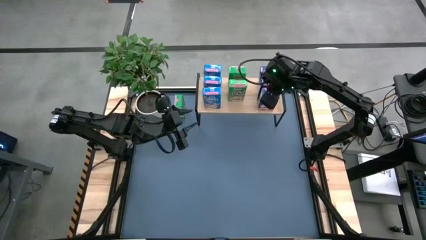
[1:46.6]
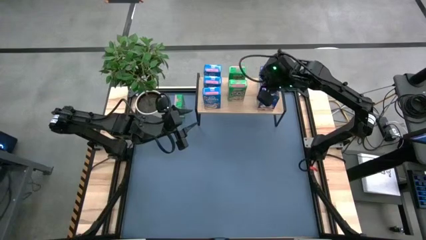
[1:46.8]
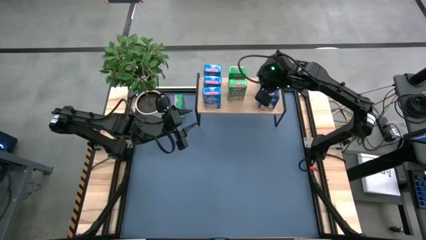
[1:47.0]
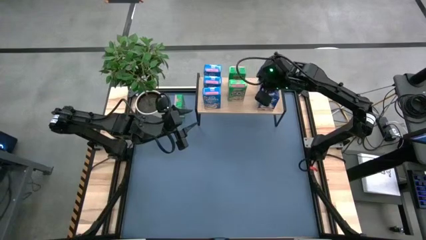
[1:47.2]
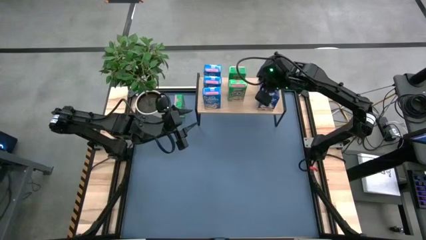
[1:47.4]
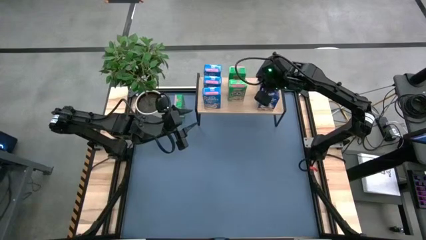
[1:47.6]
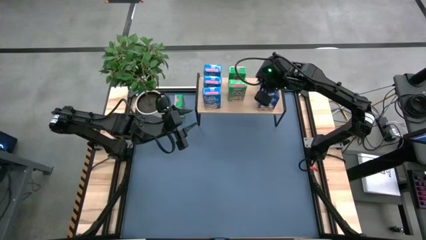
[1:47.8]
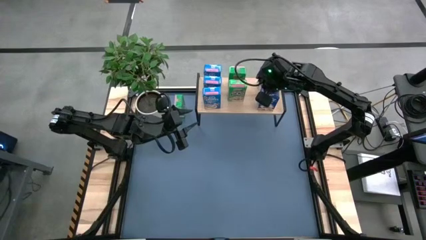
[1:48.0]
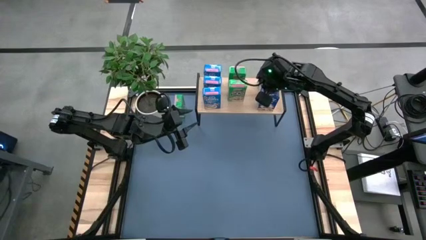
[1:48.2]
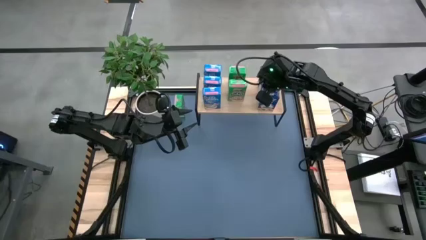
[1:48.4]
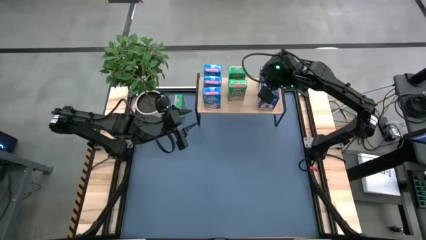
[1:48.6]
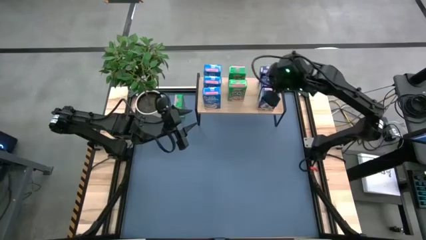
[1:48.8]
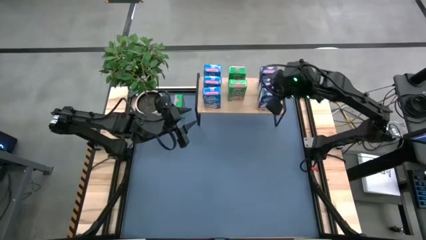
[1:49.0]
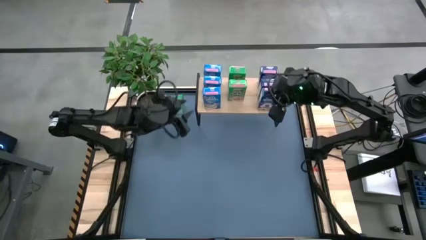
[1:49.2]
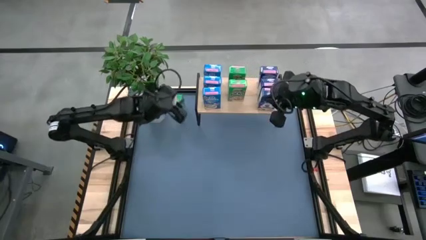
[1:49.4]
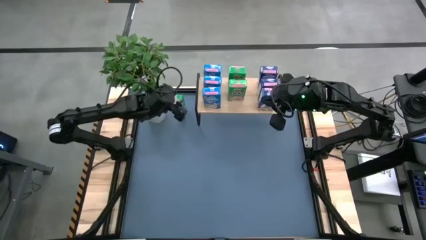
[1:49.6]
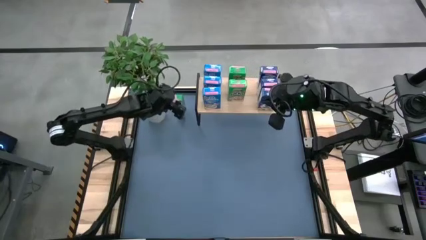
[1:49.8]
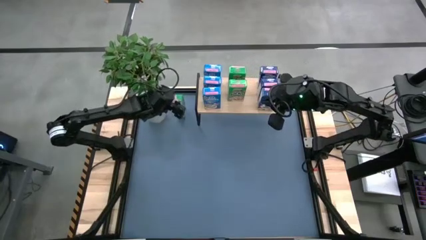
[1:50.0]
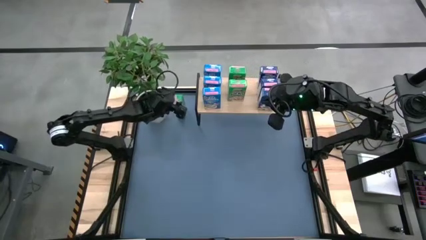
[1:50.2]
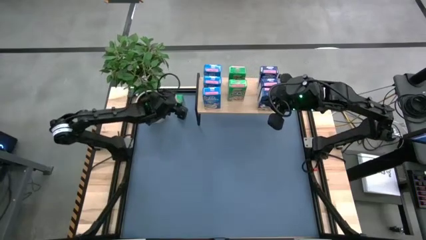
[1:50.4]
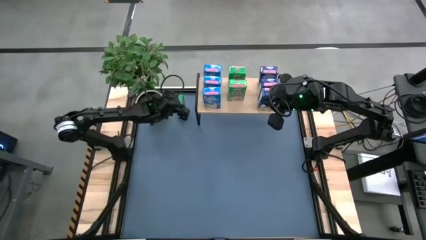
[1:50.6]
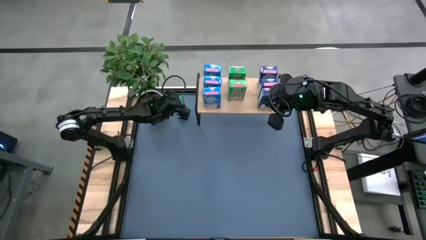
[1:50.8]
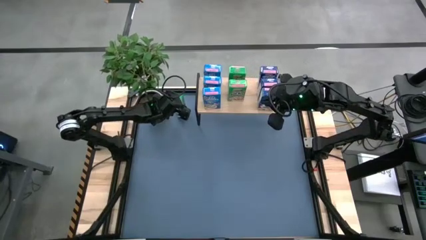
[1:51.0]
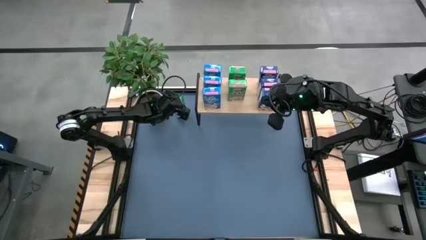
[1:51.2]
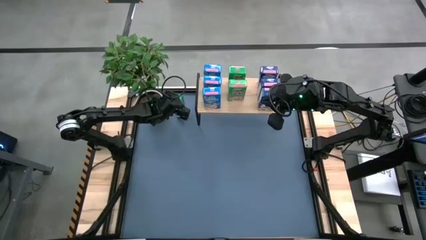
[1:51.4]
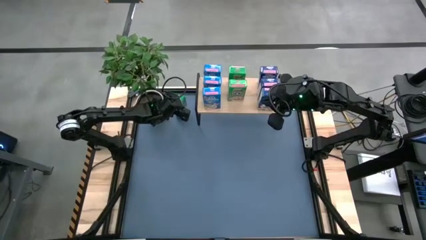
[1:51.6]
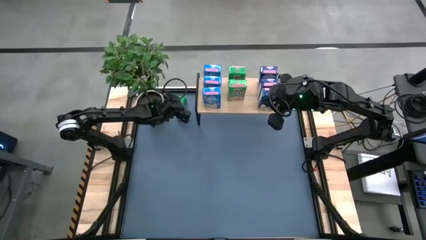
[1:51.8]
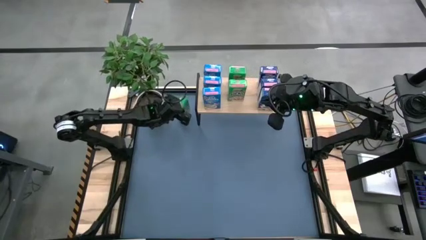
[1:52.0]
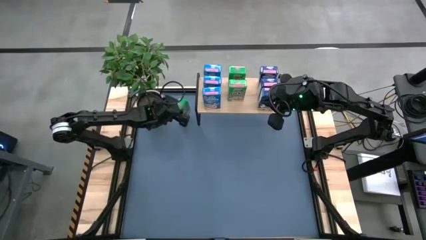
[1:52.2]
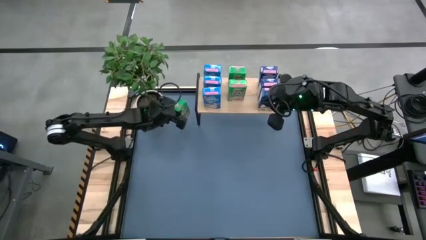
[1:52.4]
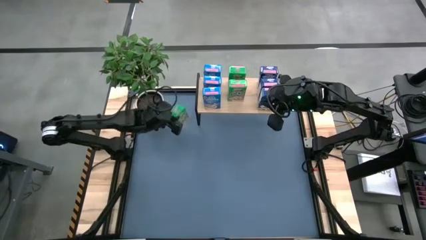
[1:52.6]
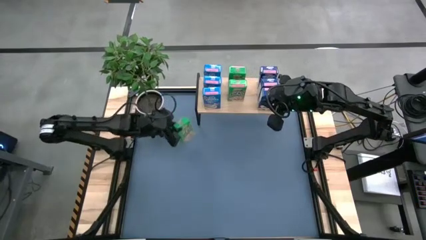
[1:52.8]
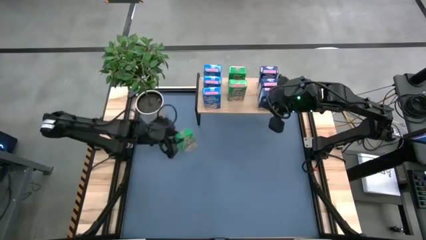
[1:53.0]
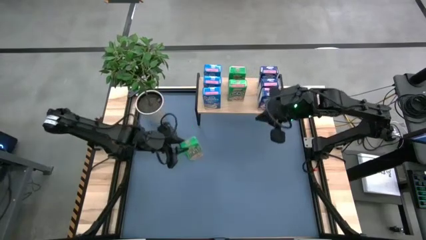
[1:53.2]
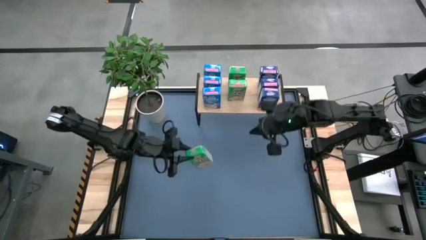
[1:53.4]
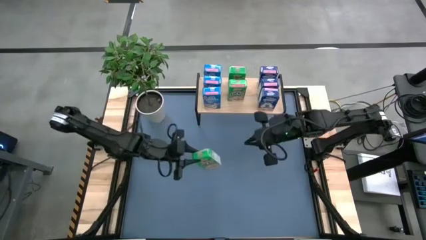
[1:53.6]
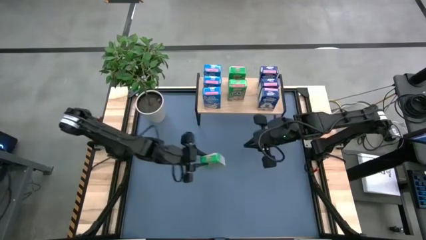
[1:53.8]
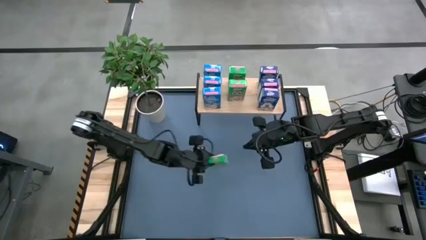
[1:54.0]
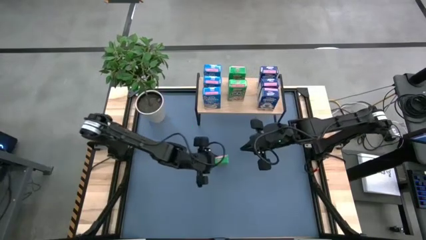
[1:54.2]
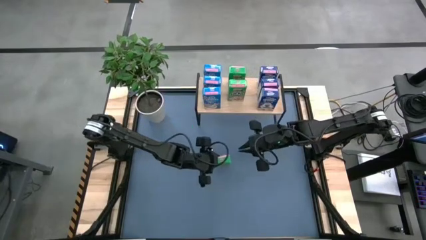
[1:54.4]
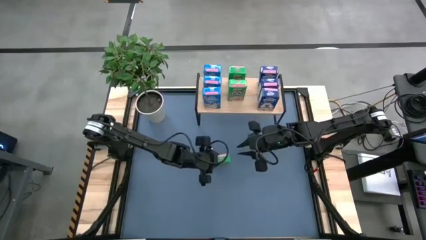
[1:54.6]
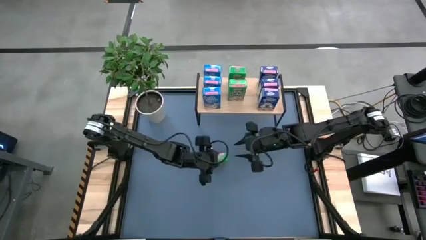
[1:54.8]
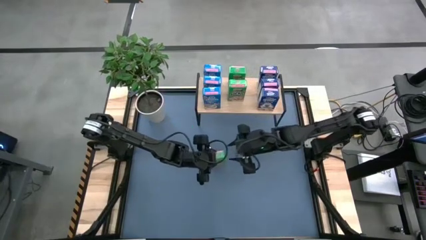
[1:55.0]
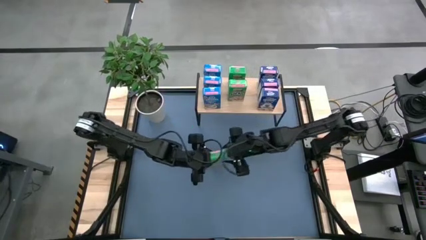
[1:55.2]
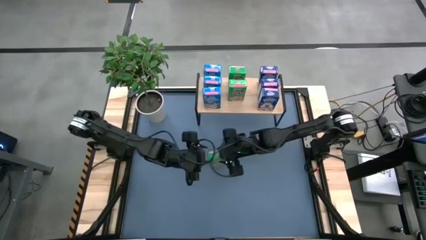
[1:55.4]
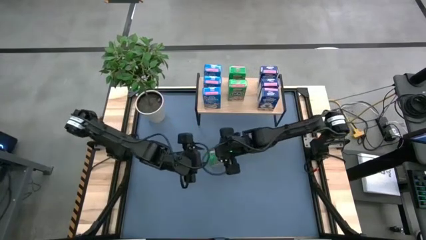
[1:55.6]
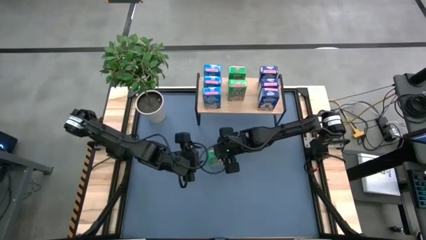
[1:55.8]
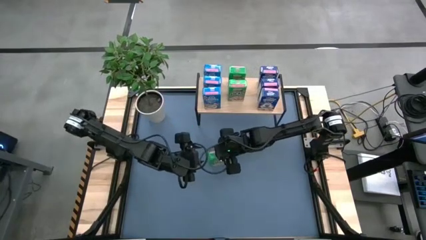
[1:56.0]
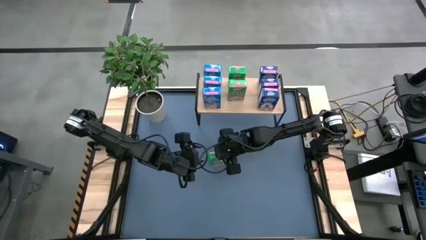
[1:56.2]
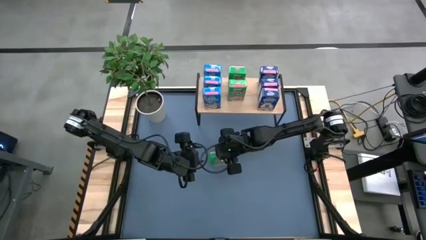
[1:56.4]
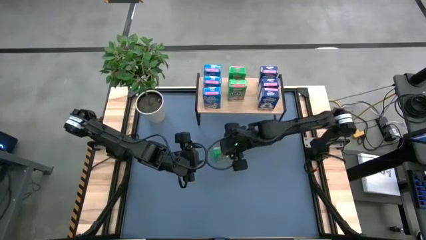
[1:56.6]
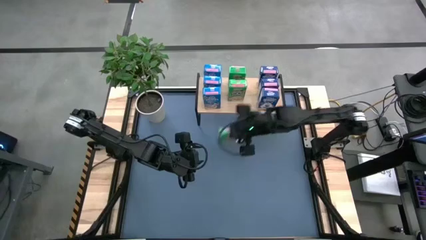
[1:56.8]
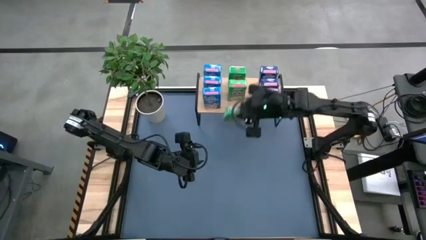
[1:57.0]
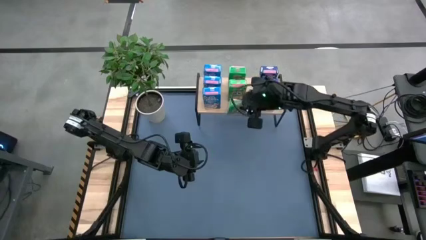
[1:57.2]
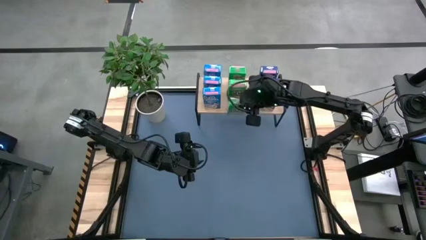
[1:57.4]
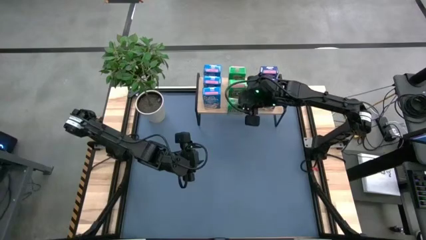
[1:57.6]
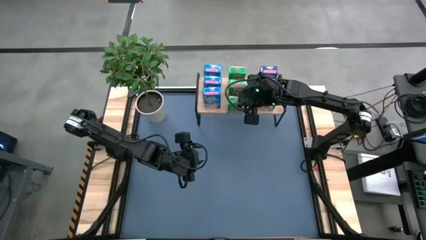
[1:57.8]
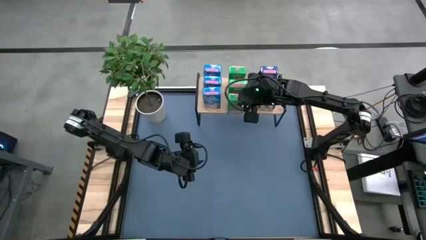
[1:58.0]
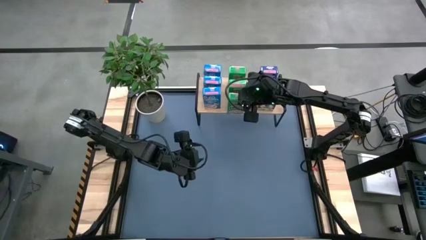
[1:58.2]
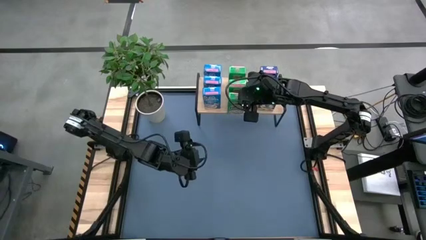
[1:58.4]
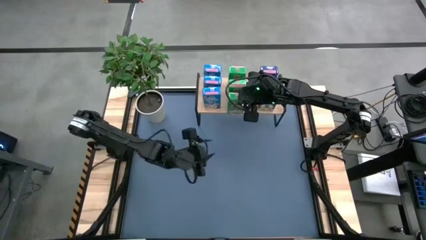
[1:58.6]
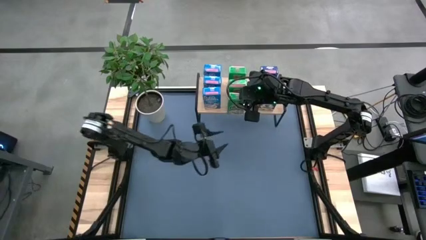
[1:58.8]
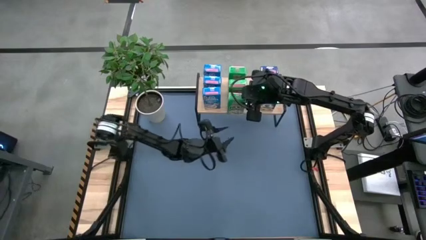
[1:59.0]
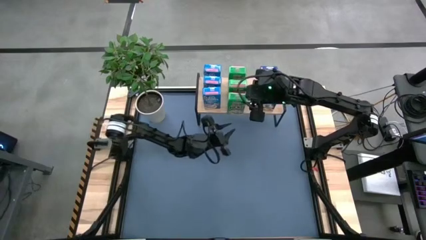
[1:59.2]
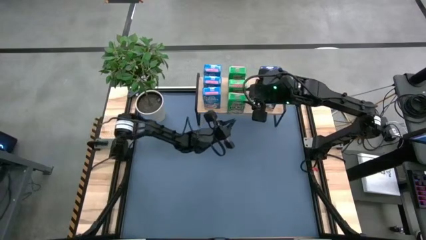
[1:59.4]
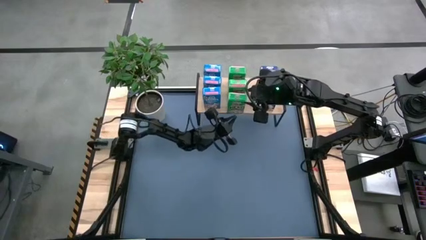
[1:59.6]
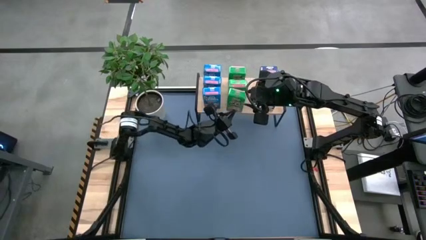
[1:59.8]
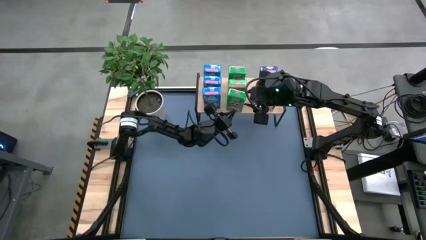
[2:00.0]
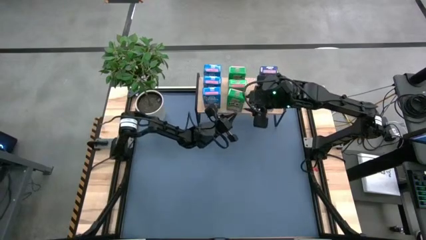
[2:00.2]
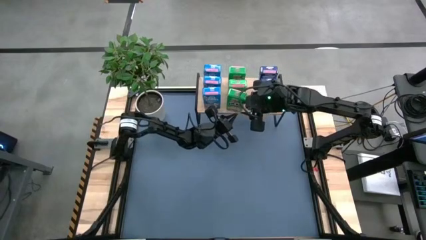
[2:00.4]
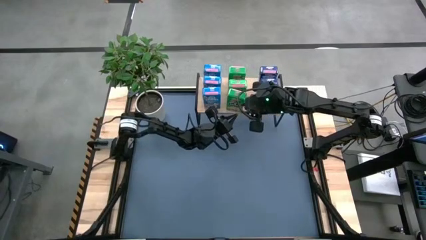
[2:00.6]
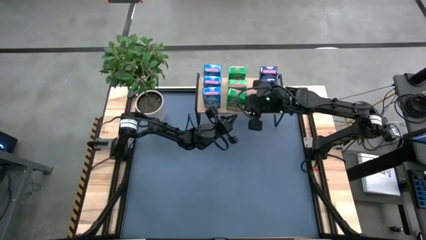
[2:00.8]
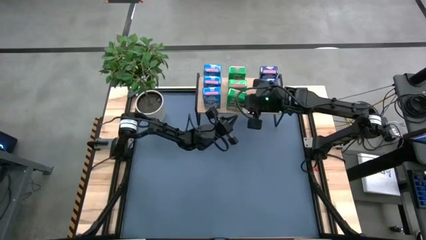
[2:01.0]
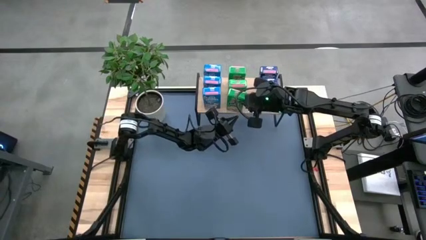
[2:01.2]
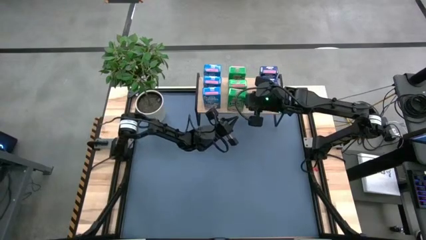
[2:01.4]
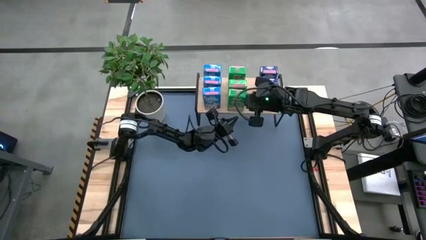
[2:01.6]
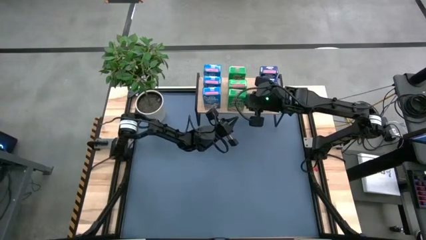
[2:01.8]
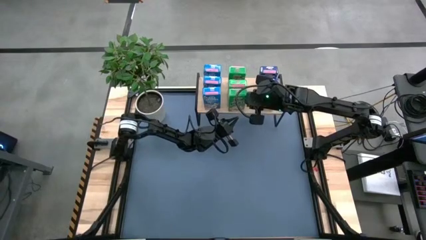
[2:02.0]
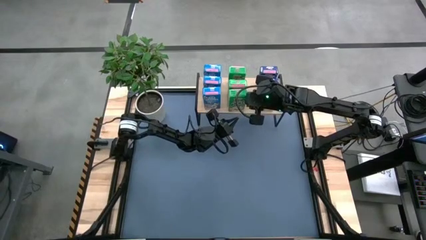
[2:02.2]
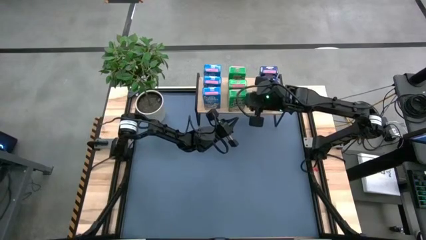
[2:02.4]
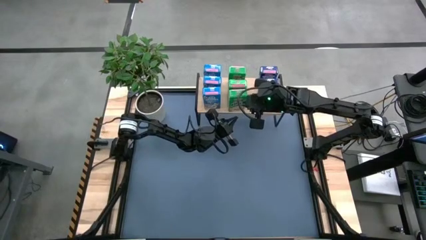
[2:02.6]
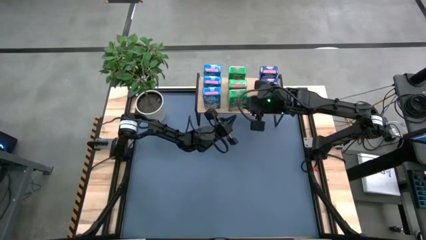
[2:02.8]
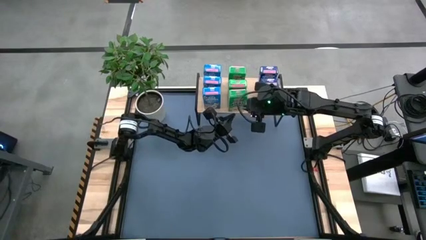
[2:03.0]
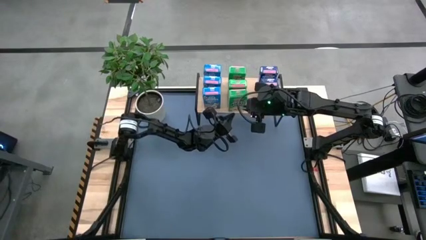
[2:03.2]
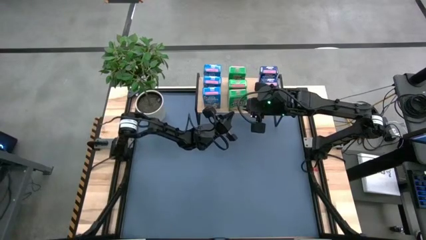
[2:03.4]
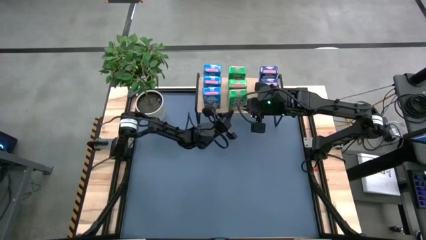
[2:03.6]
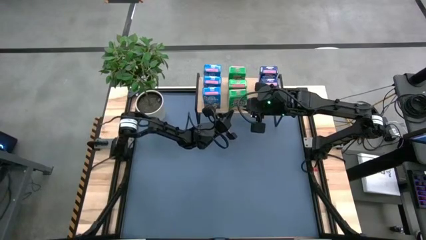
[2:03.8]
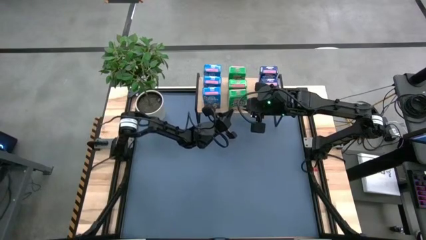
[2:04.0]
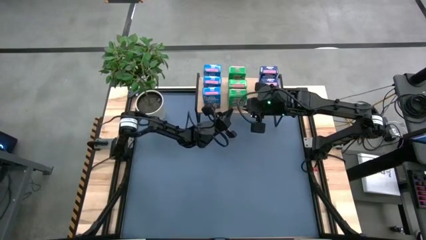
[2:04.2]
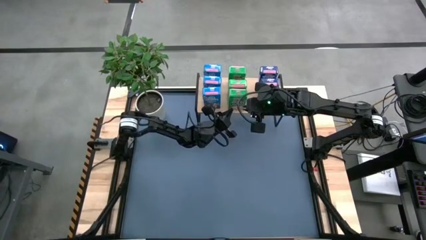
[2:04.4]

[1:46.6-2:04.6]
Task: Stack cereal on shelf
Put the green cereal box on the shelf aligned with the other green cereal boxes
